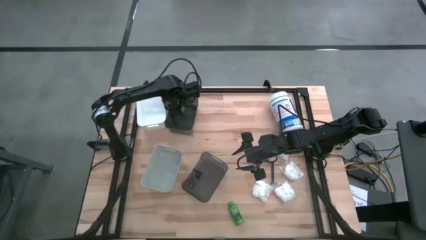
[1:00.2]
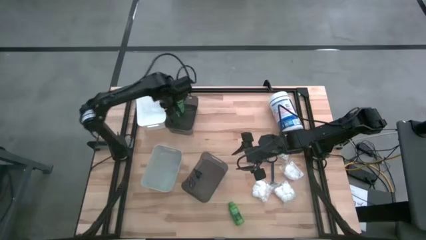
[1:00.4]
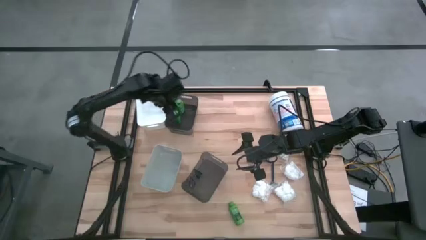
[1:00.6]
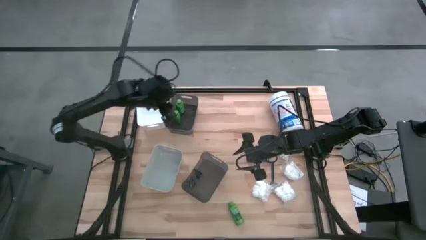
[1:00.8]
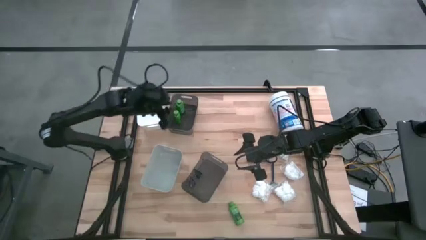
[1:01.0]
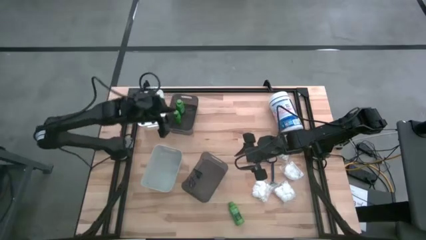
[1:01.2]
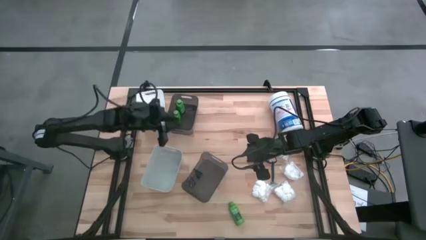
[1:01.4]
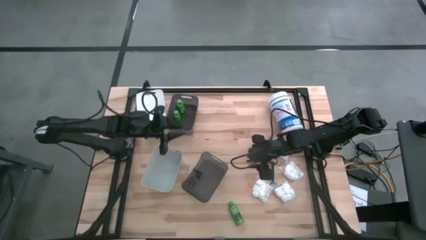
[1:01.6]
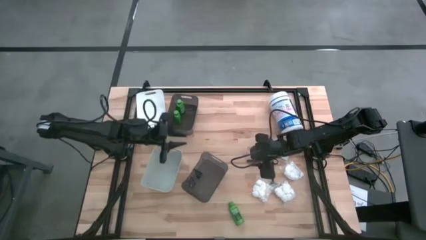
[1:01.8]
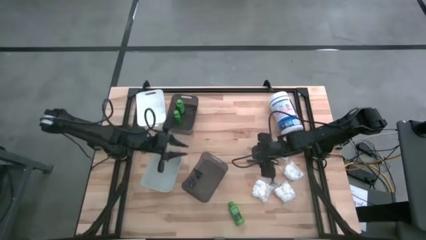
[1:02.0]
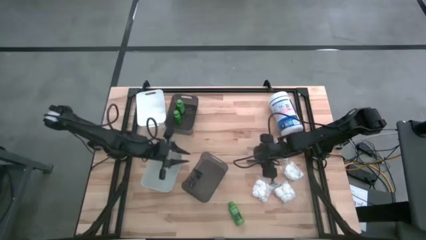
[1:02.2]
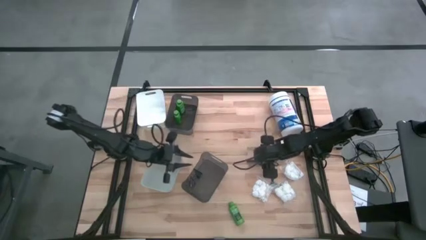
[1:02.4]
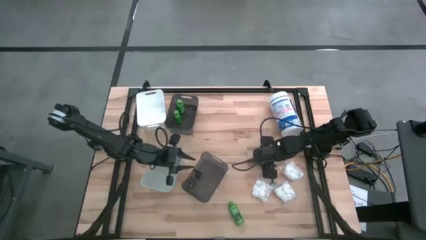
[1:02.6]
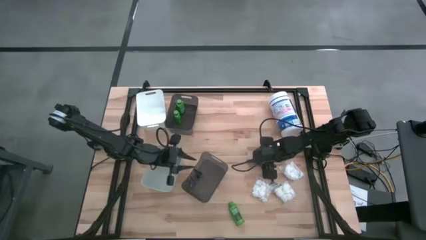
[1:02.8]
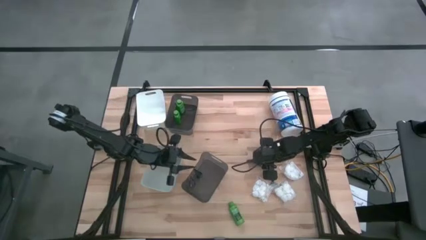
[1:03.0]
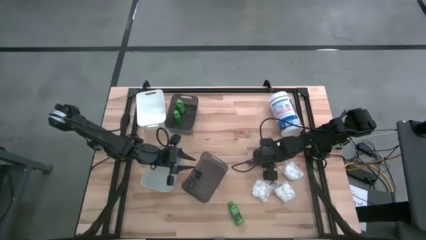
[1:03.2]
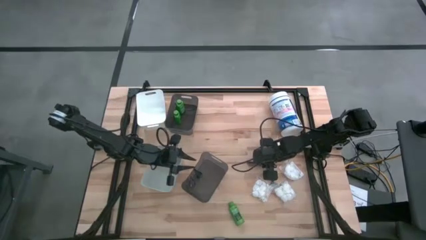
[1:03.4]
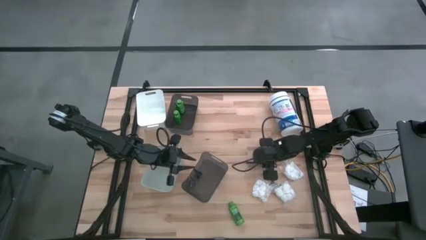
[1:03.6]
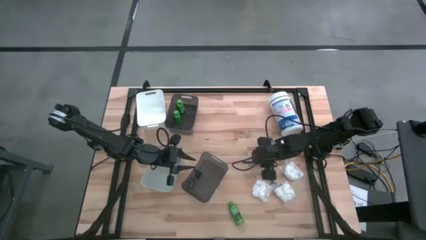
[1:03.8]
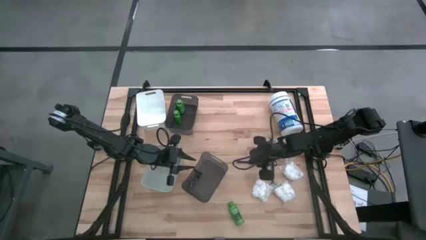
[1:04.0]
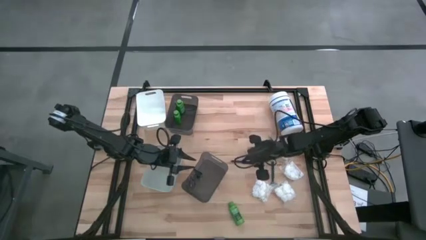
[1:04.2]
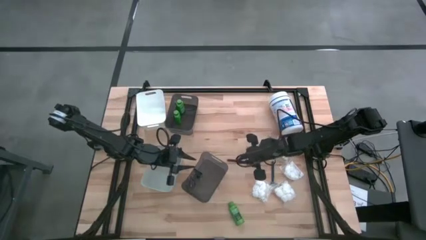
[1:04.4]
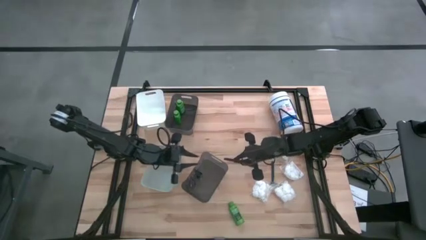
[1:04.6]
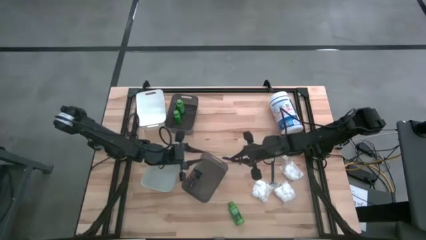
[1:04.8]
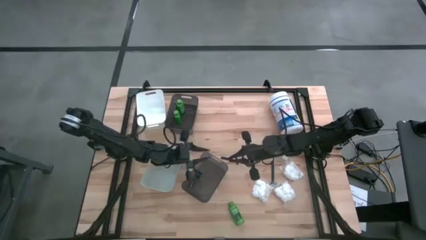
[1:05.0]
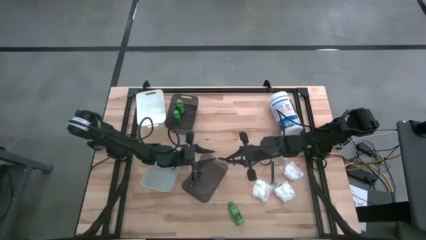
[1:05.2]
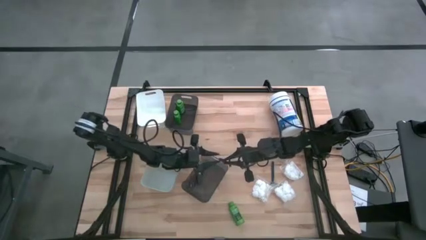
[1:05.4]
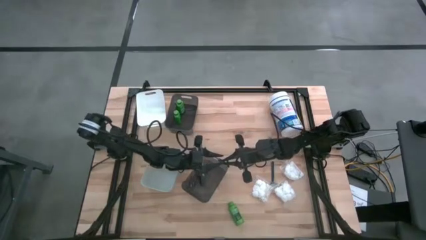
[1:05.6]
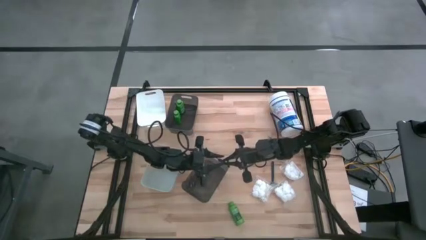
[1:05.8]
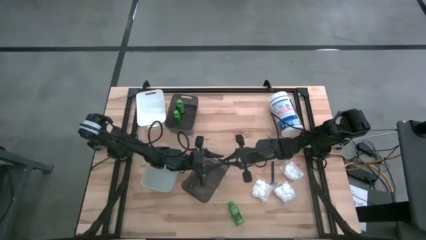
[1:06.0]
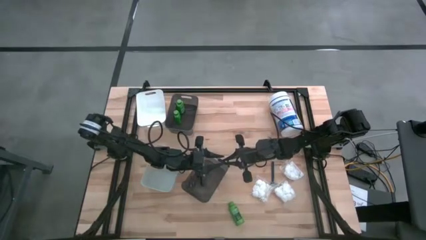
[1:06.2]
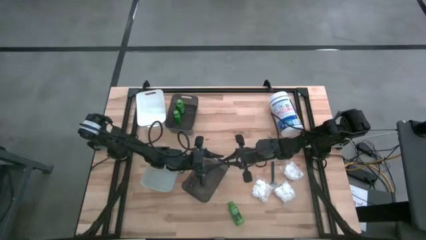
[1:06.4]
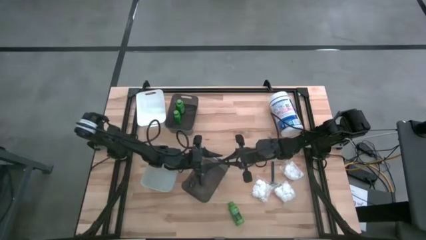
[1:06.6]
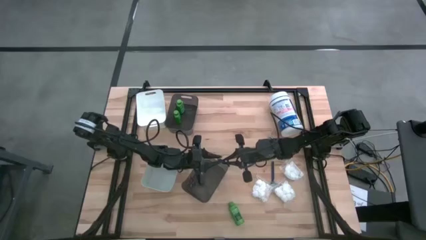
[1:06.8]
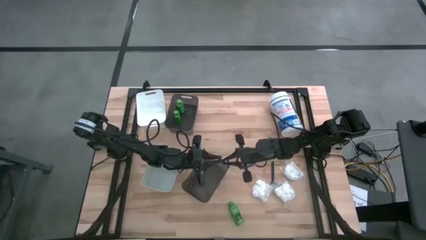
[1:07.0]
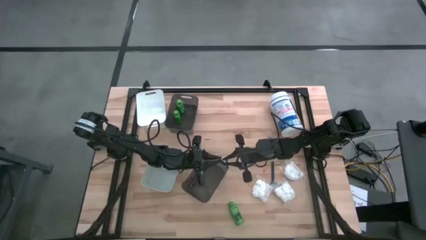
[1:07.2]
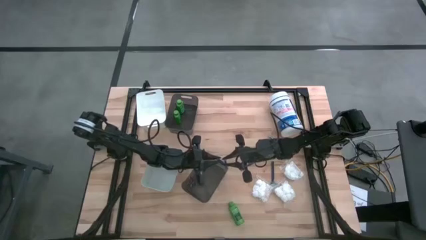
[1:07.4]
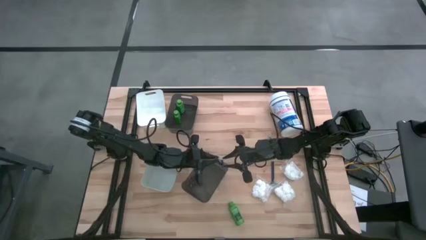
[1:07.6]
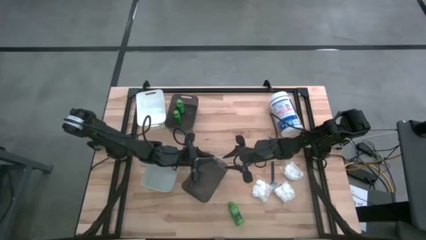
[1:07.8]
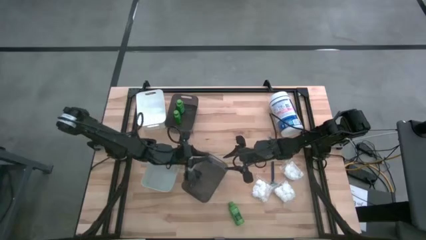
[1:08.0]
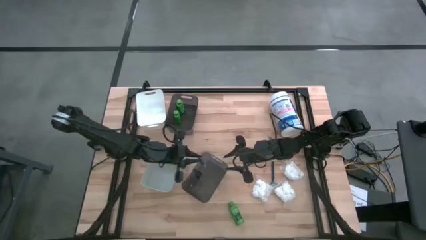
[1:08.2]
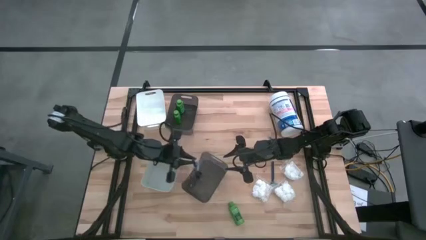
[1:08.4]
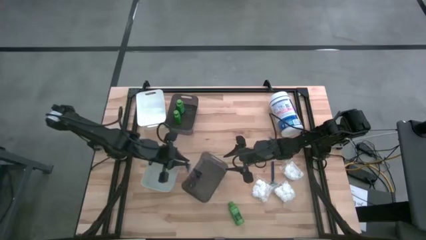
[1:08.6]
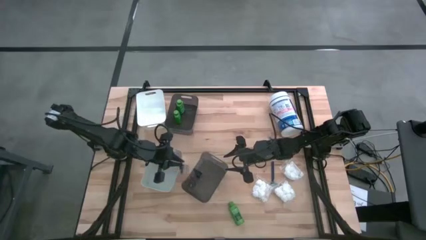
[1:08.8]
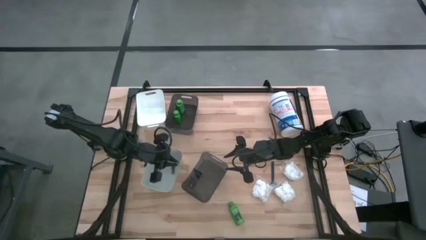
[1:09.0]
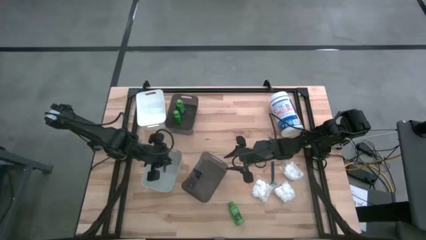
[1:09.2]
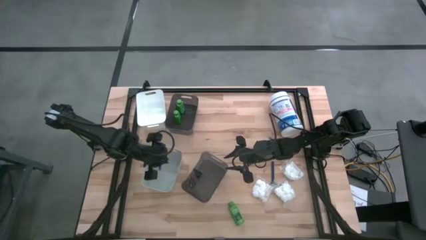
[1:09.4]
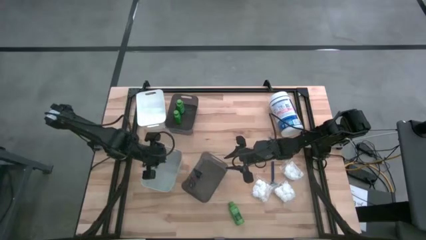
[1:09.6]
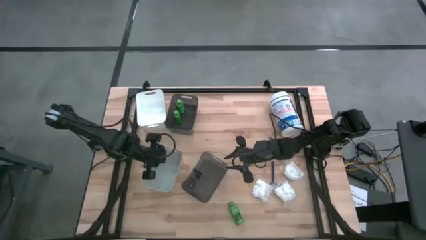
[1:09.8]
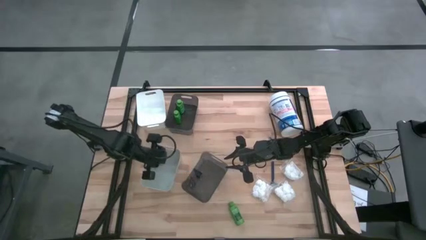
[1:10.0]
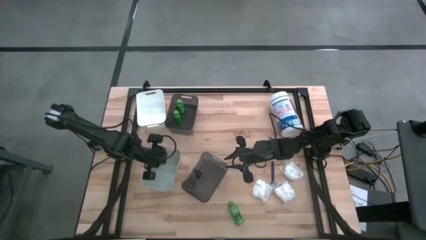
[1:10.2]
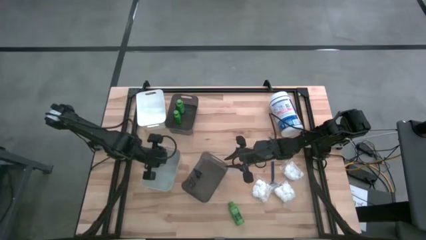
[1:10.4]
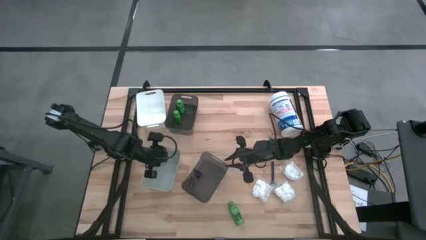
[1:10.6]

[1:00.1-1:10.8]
Task: Pick & Place Travel size toiletries
Put the middle blue razor into the gray bin

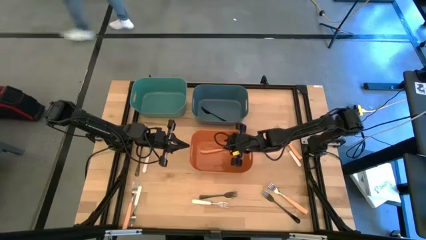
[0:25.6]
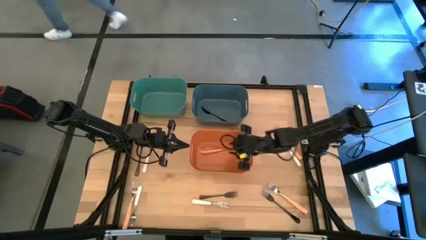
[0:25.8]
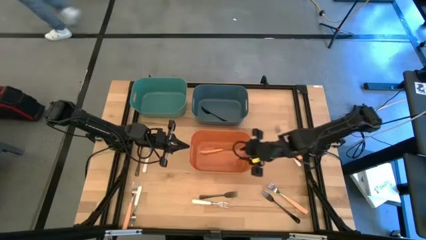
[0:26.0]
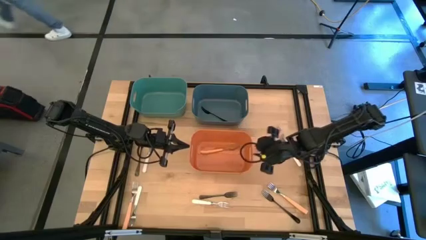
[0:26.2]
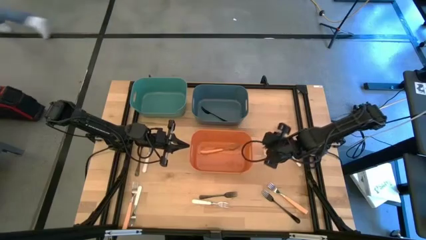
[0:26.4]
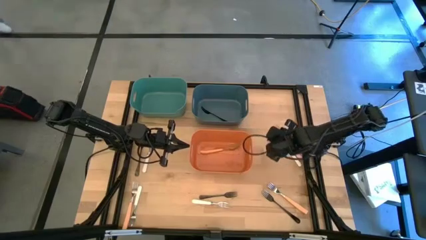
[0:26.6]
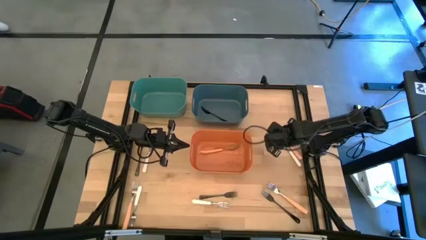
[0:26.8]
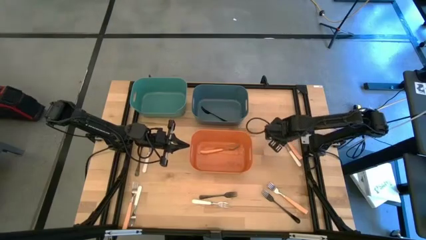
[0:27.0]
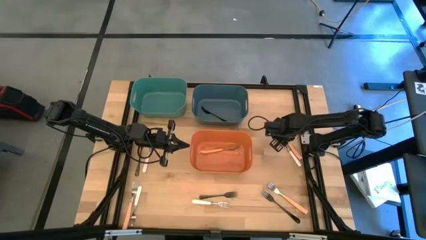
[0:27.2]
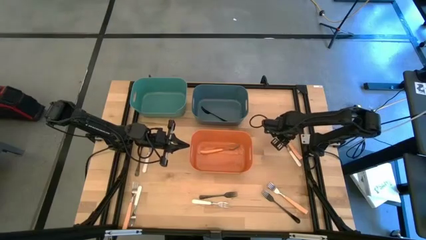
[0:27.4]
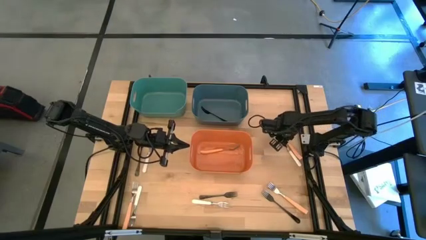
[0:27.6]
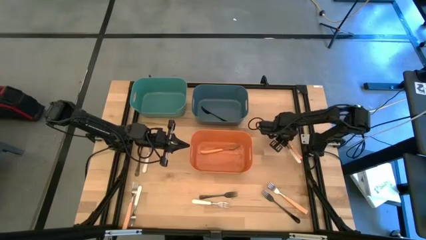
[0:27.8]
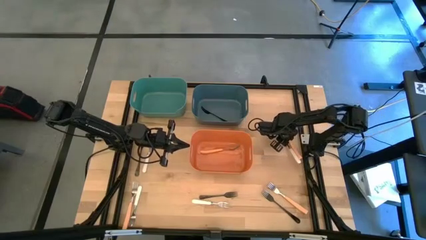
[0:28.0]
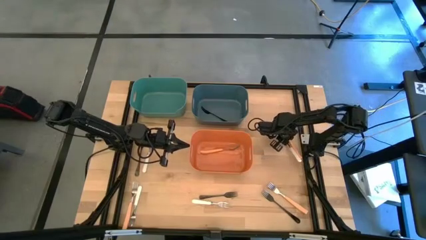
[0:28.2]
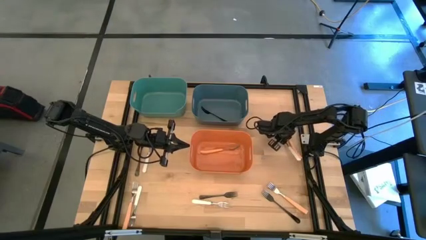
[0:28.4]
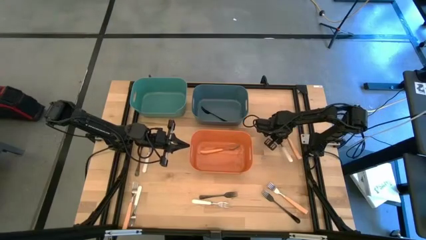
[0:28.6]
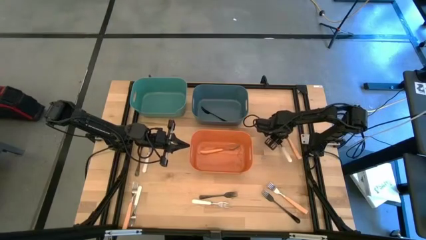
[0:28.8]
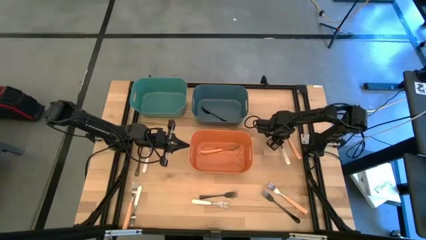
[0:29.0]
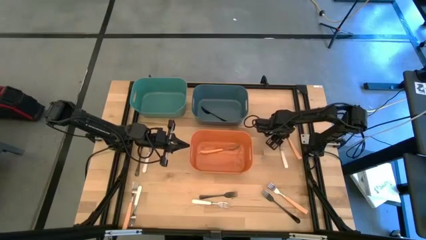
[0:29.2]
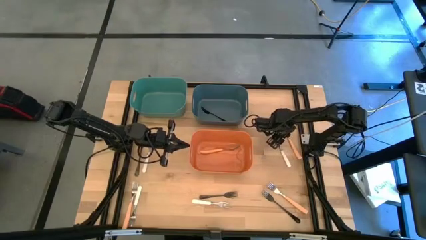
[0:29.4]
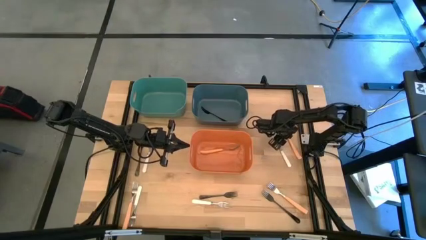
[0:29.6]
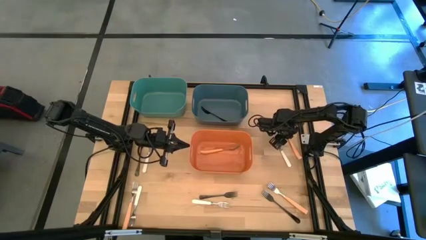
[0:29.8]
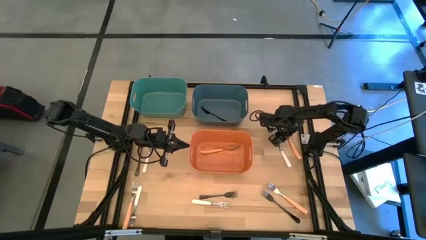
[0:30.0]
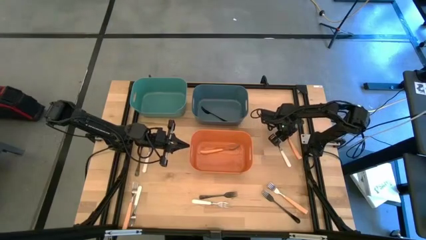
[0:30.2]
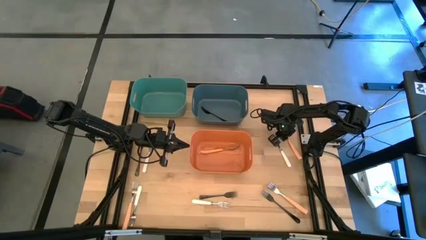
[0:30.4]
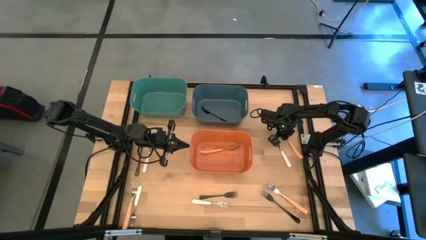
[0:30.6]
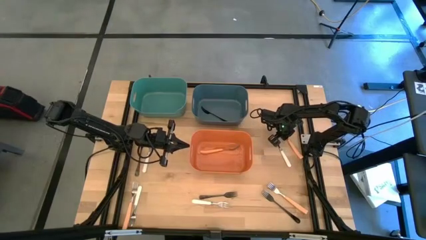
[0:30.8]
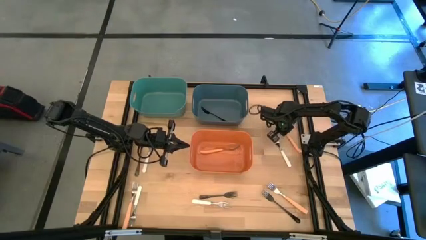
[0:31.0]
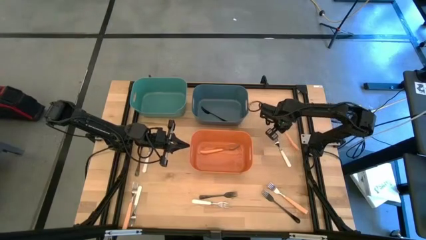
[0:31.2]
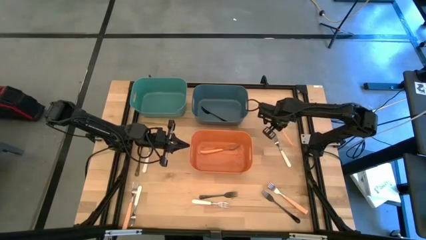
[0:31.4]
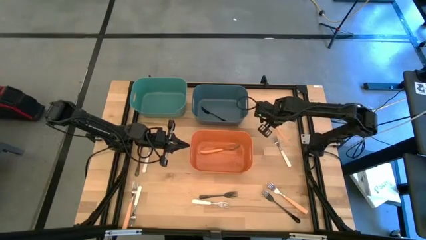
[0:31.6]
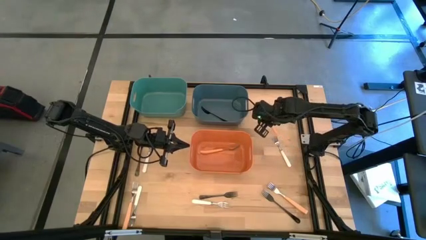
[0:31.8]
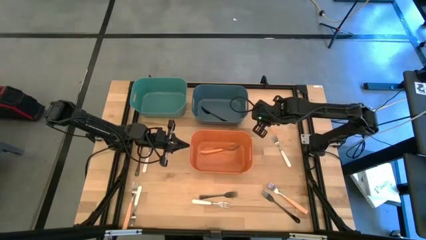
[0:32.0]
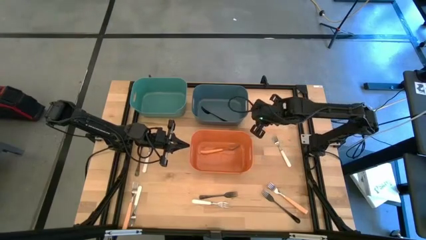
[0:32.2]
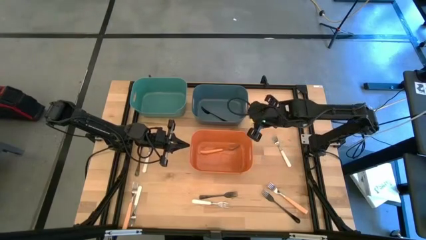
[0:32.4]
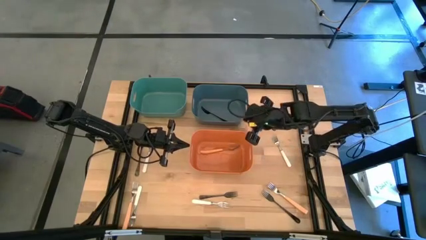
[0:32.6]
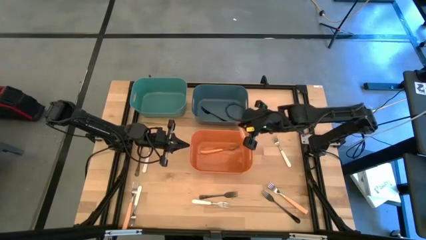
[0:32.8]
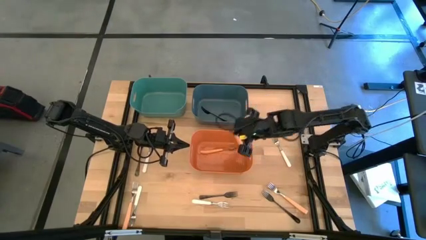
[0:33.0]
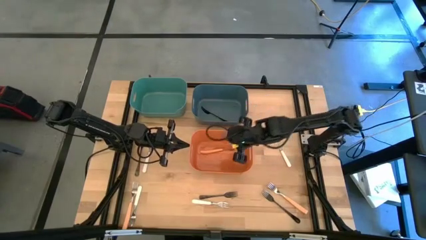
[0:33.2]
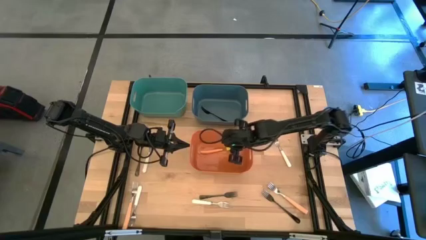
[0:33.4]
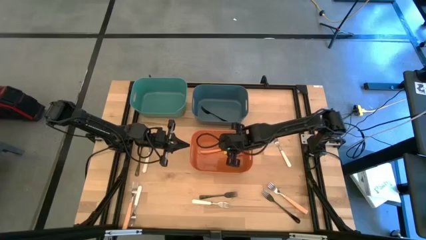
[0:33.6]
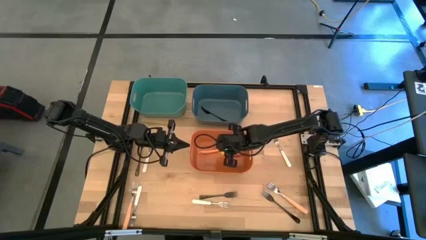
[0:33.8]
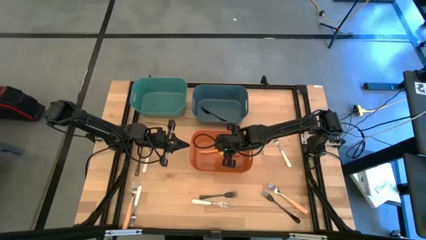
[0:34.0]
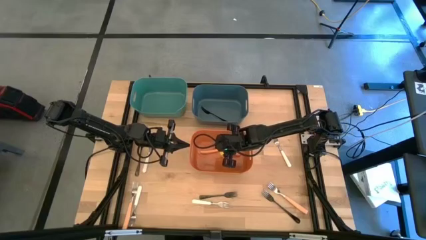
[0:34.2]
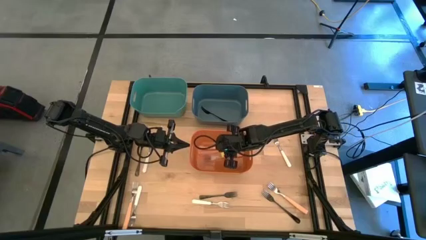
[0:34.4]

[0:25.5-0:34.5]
Task: Sort silverware by color (type)
Put the orange fork into the orange bin
